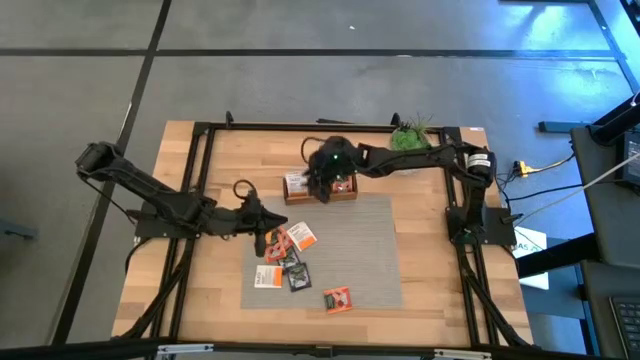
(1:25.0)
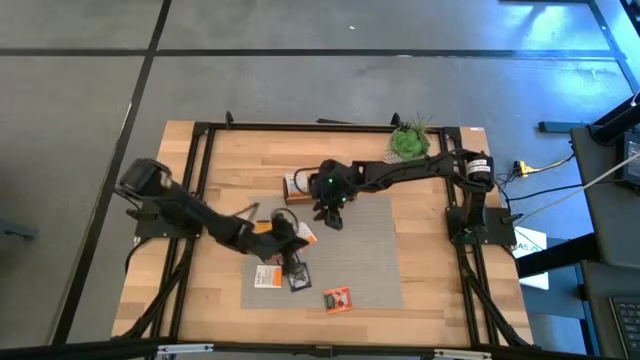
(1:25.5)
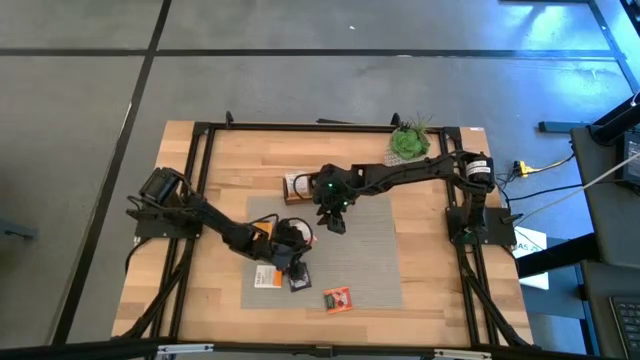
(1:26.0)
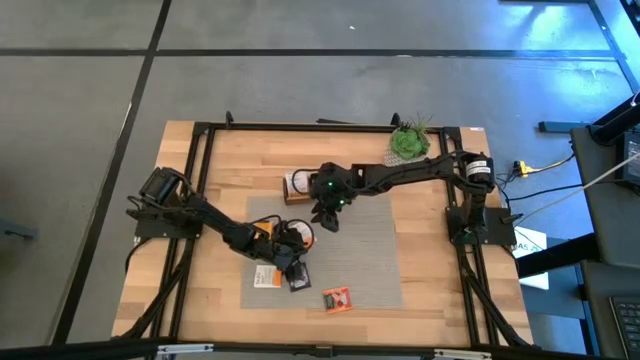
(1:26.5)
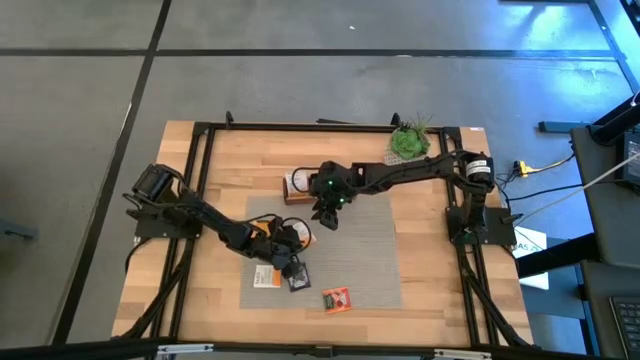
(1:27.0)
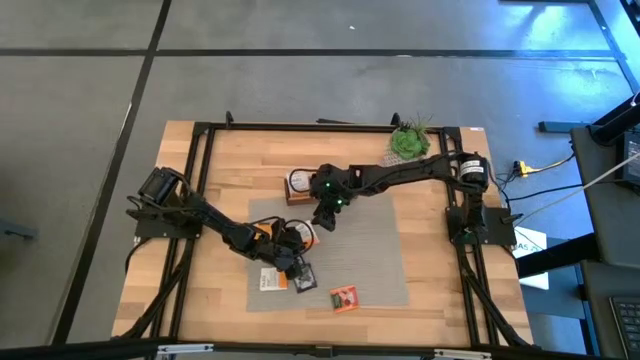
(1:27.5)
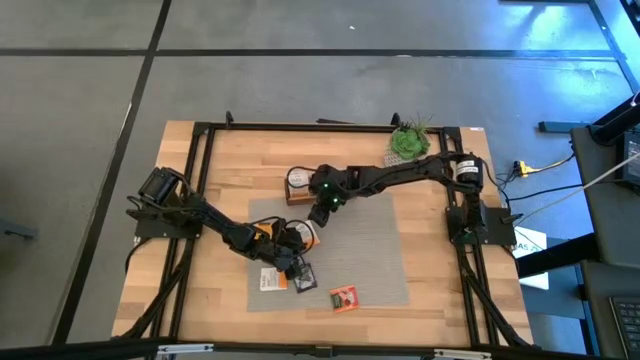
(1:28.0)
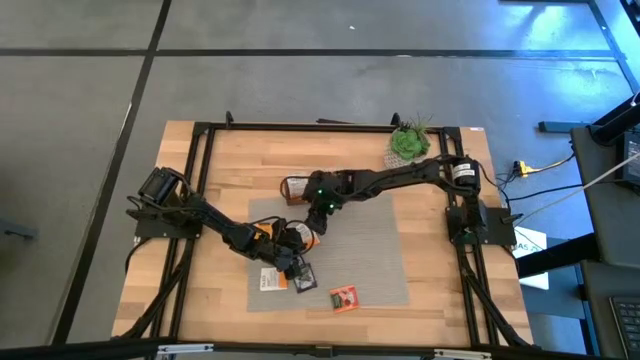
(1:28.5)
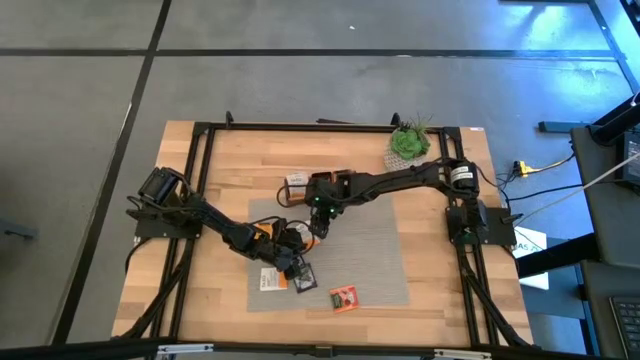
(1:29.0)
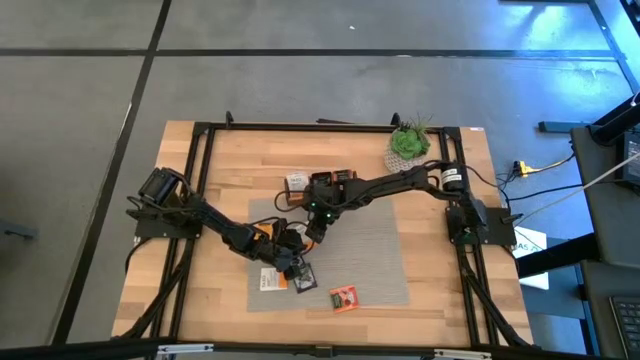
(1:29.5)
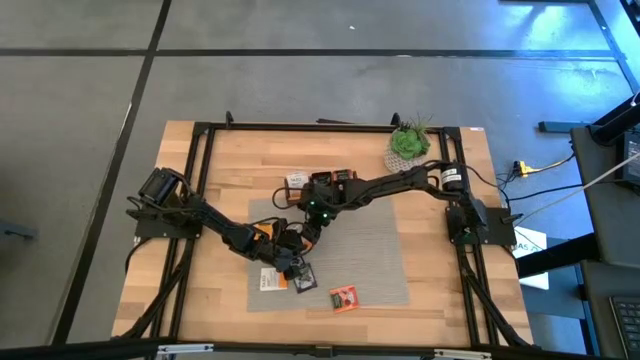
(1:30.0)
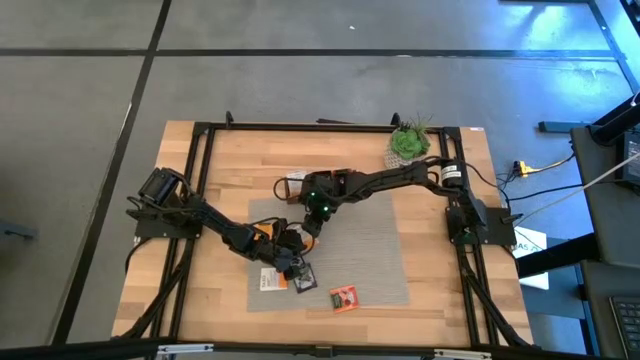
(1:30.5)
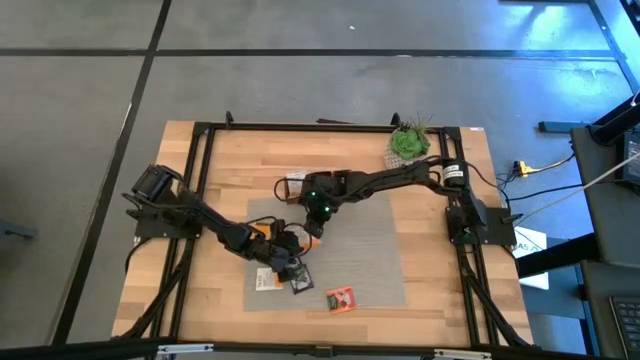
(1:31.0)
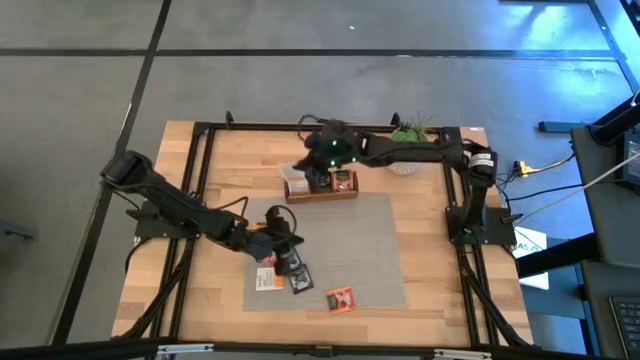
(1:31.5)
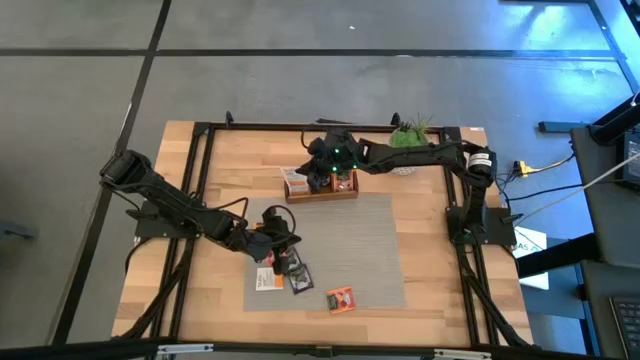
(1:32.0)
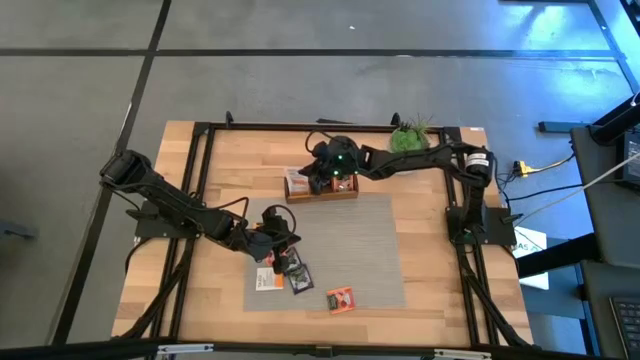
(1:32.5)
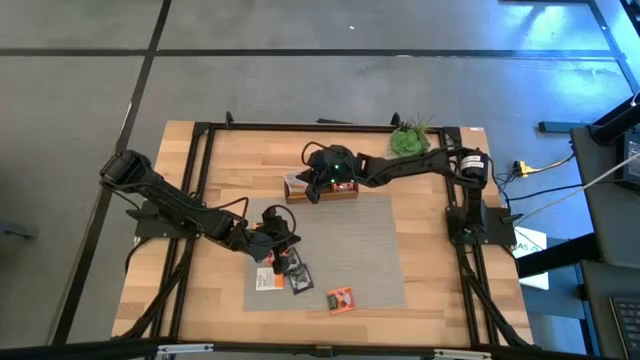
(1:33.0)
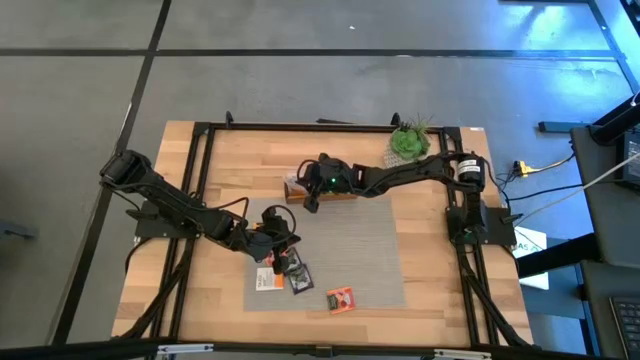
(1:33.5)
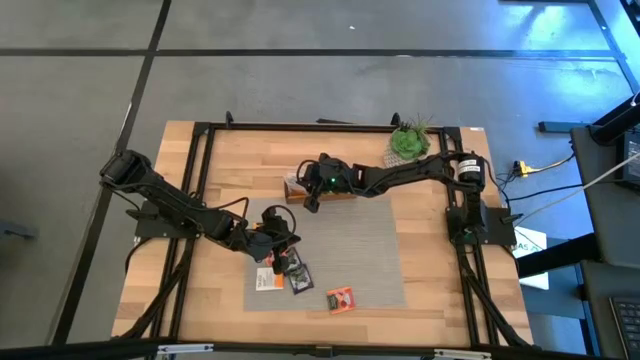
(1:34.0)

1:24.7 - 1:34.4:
Task: Pick & Place Tea
Put the white tea bag into the left section of the wooden organizer

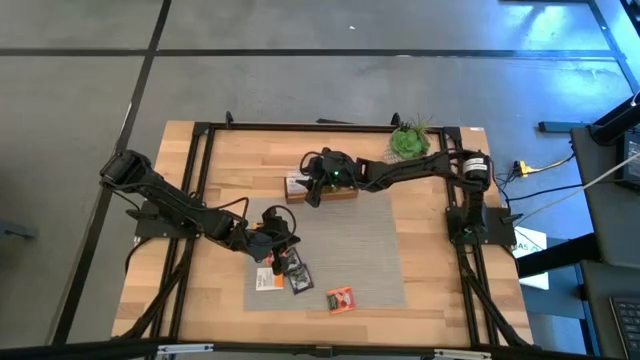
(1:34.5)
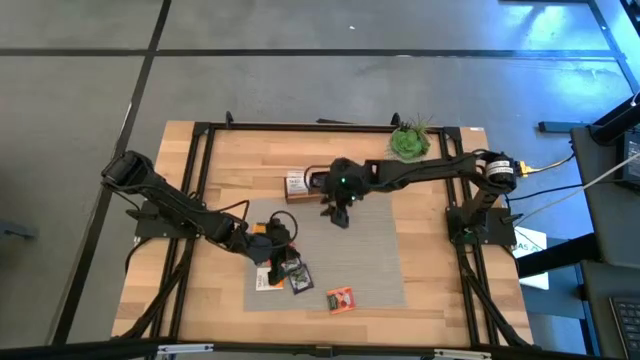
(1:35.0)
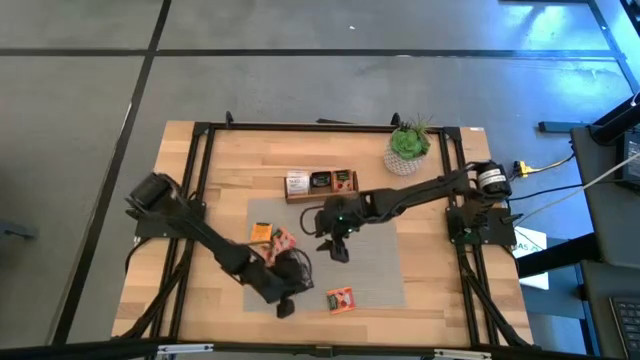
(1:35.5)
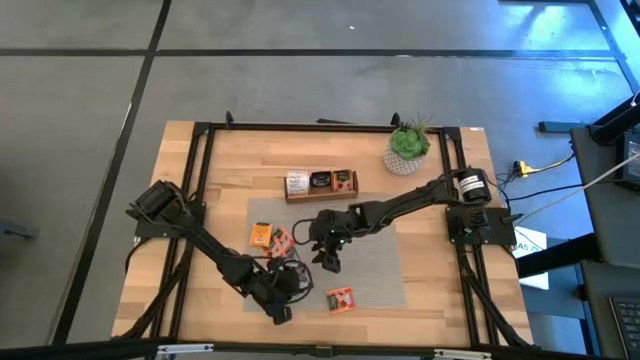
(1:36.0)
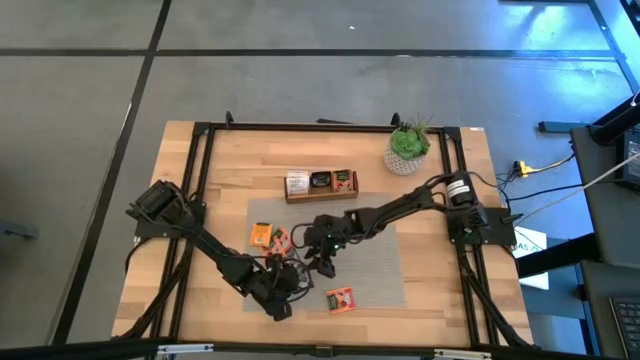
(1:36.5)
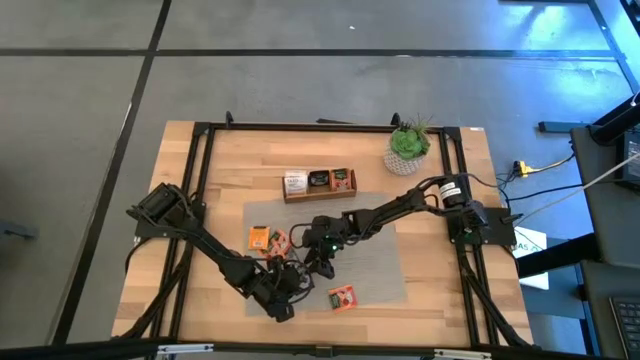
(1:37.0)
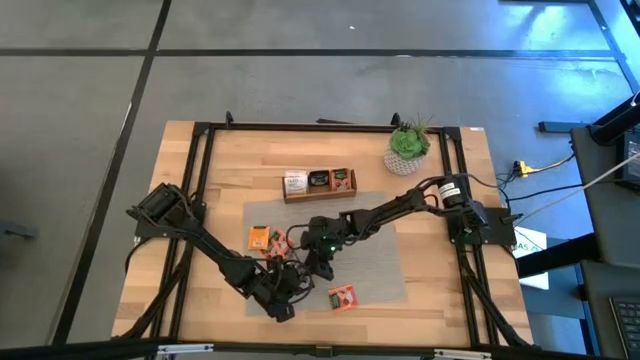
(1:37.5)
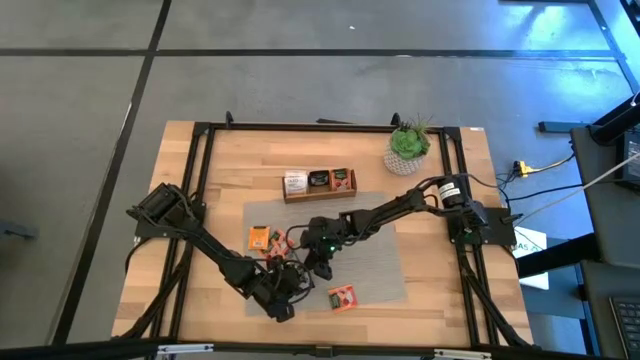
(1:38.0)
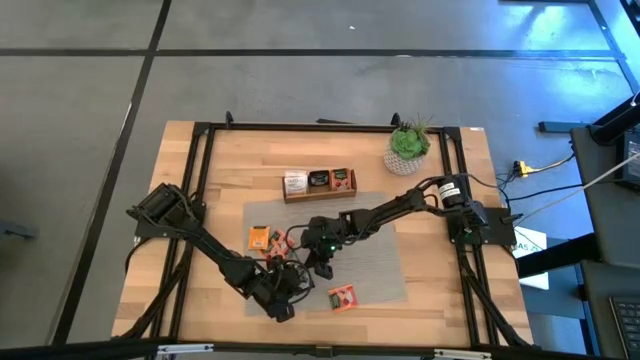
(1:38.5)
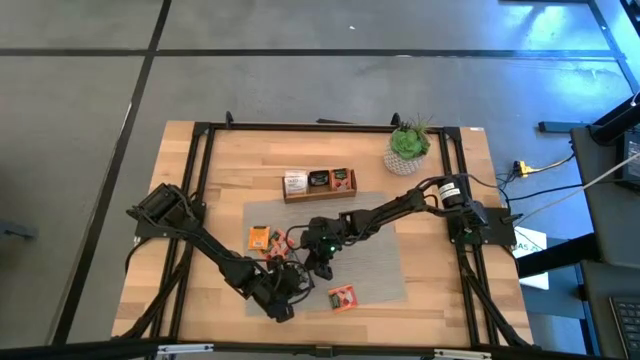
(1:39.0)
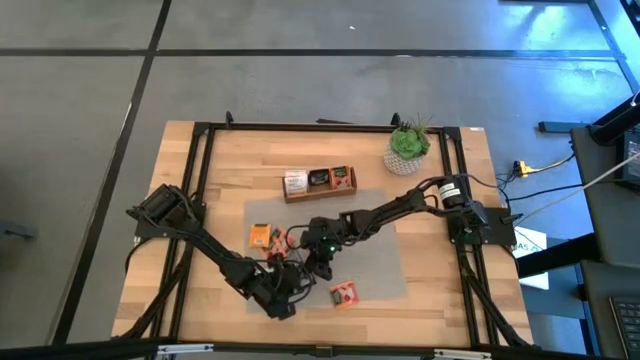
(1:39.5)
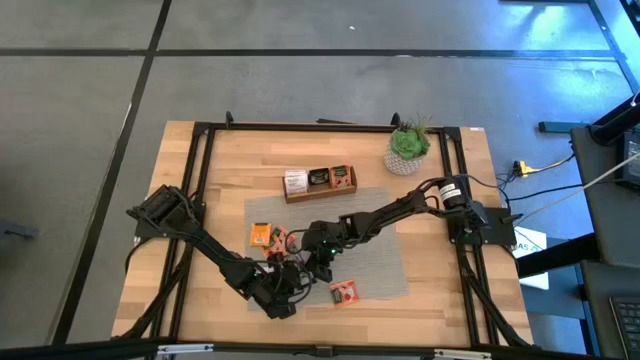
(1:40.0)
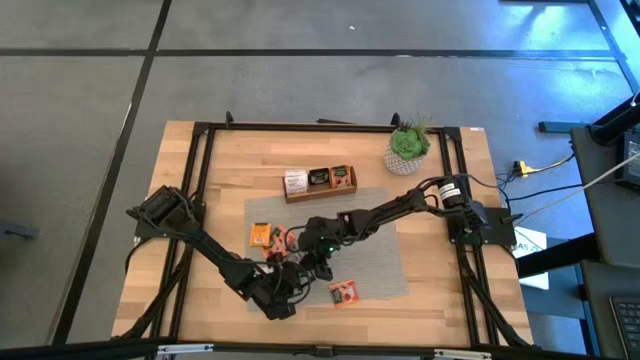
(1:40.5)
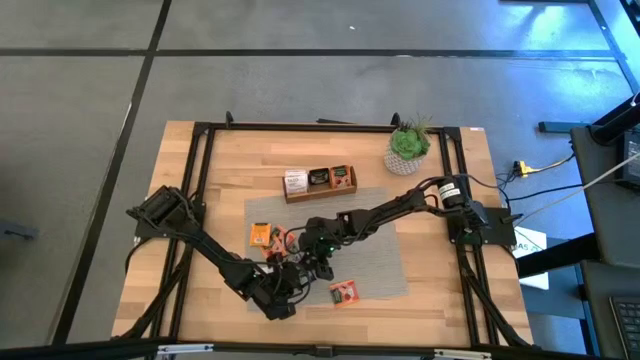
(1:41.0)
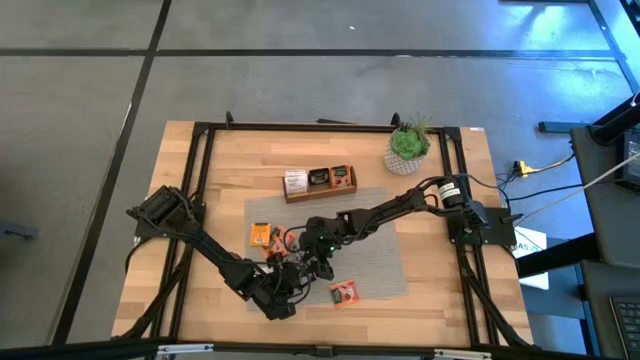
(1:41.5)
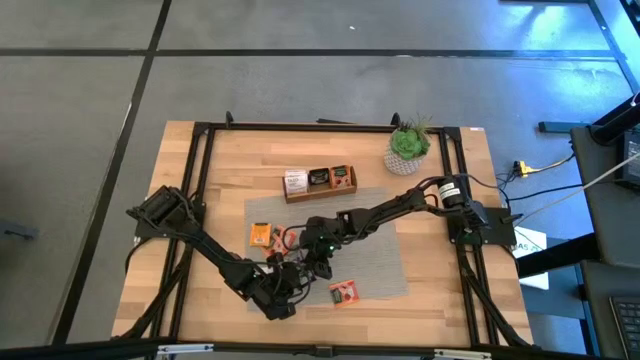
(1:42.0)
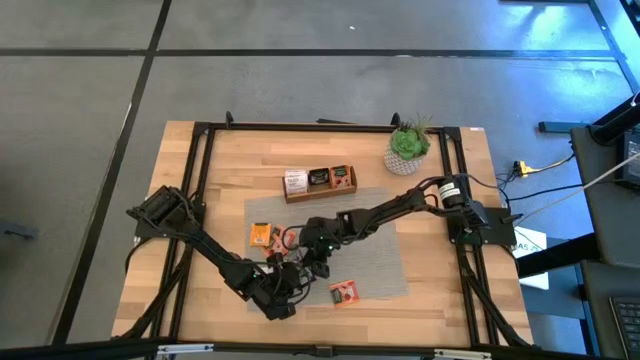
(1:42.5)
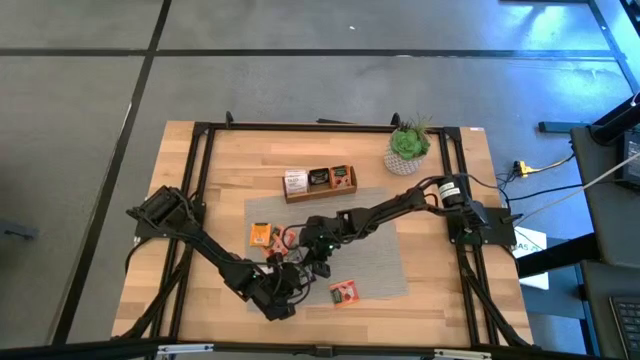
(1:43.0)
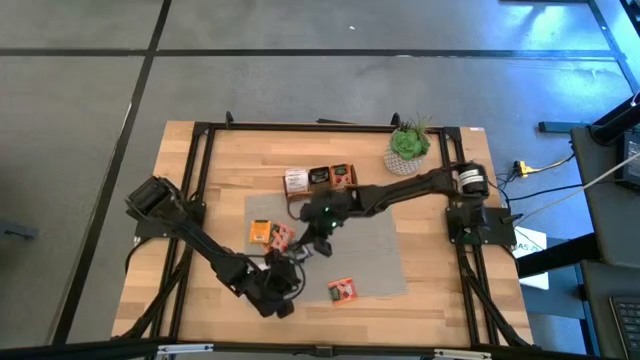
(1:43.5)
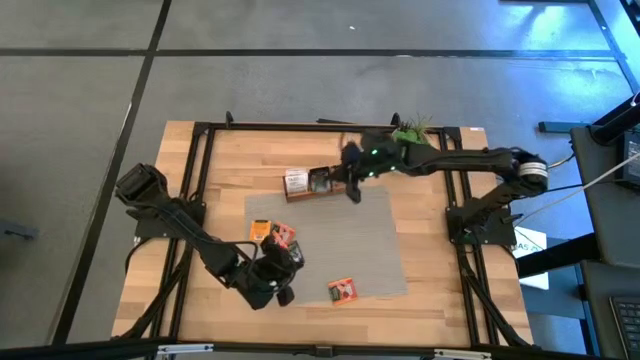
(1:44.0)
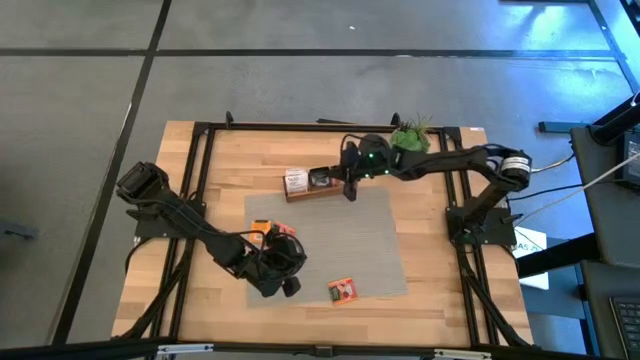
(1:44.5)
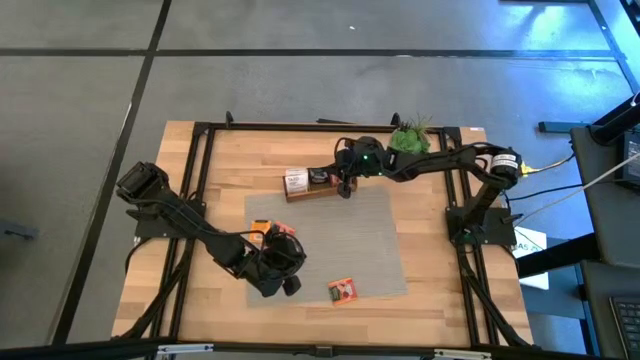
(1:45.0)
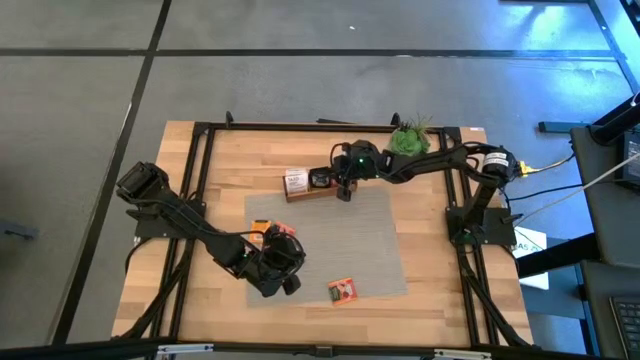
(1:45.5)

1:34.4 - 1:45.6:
Put the blue tea bag into the middle section of the wooden organizer
